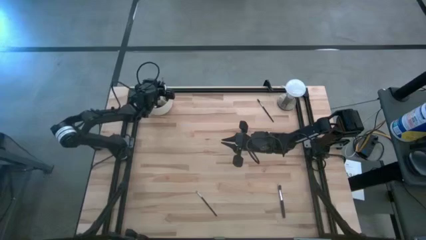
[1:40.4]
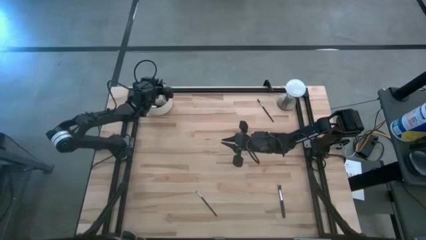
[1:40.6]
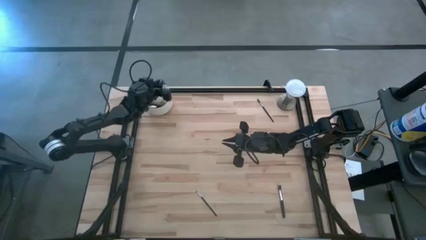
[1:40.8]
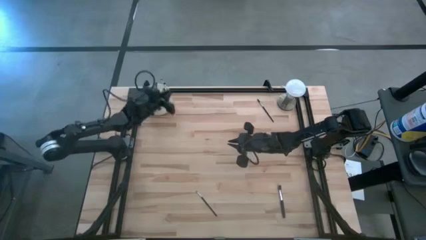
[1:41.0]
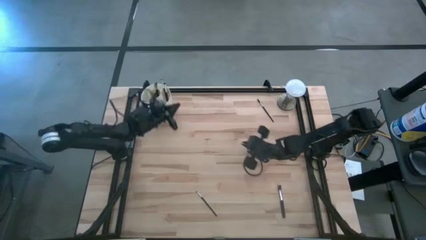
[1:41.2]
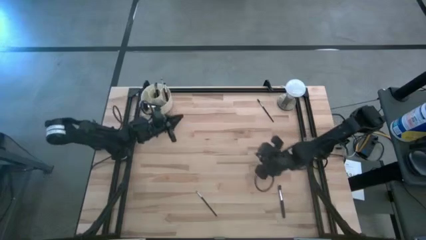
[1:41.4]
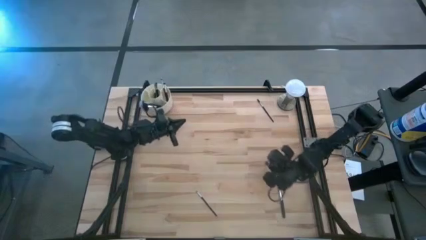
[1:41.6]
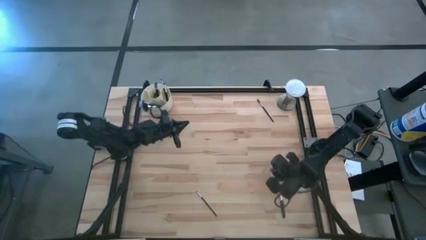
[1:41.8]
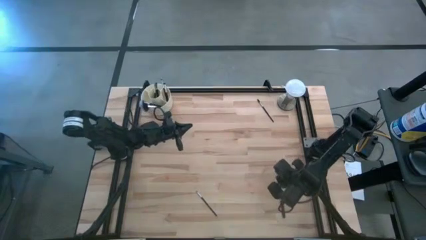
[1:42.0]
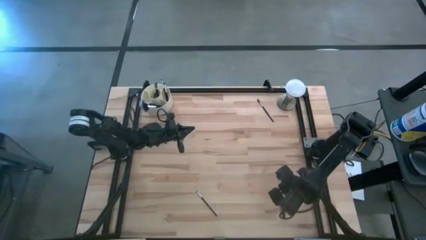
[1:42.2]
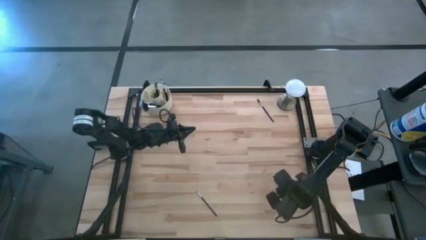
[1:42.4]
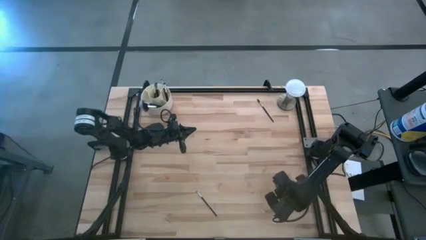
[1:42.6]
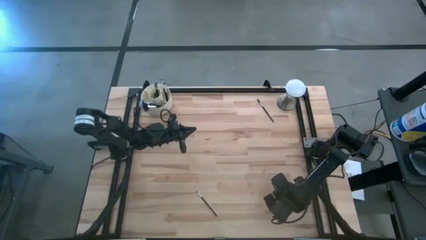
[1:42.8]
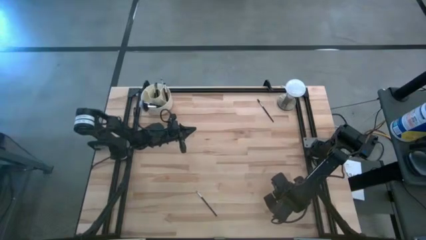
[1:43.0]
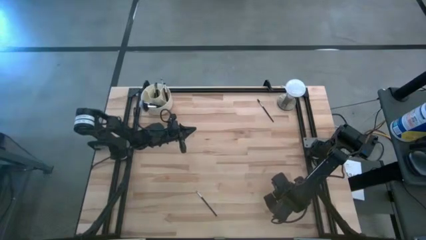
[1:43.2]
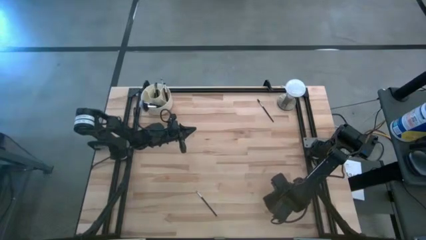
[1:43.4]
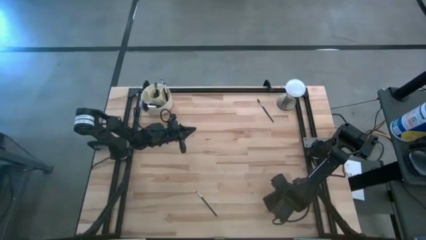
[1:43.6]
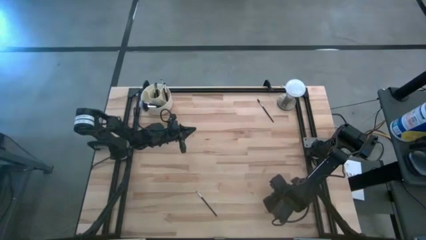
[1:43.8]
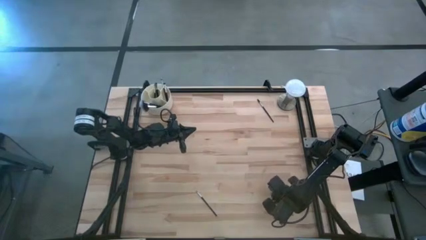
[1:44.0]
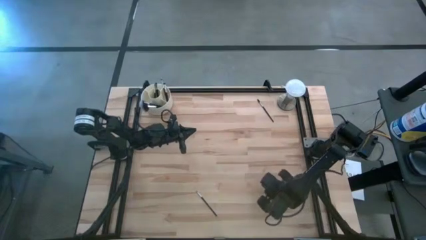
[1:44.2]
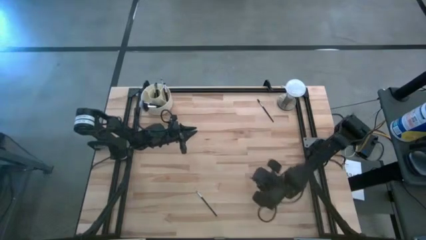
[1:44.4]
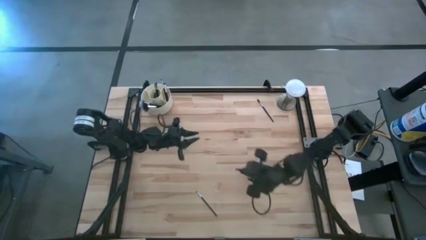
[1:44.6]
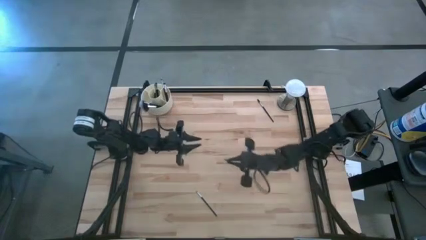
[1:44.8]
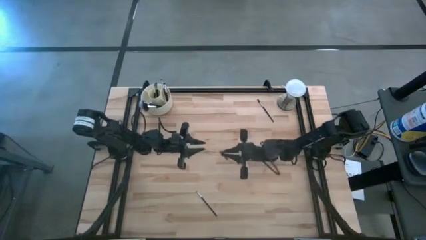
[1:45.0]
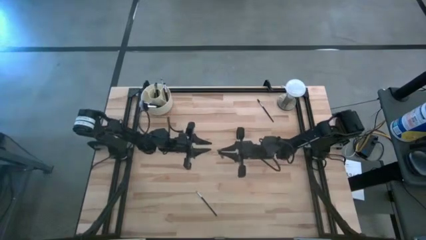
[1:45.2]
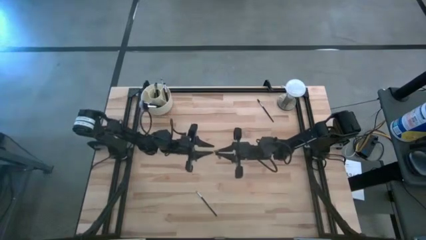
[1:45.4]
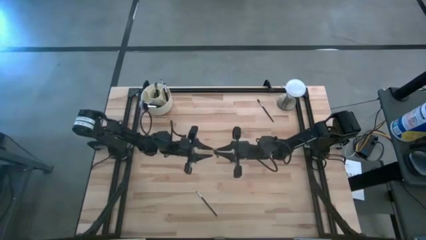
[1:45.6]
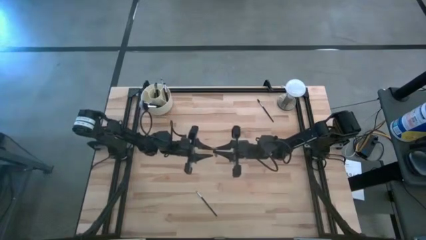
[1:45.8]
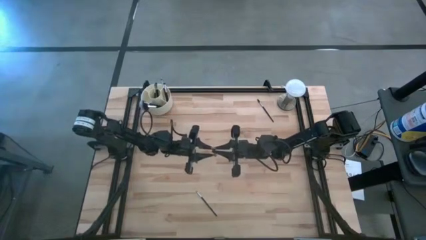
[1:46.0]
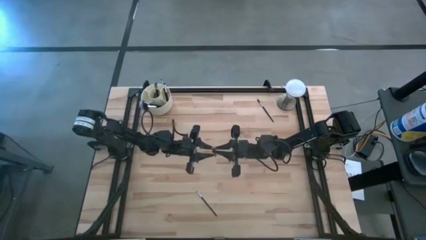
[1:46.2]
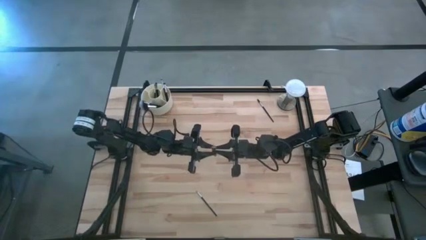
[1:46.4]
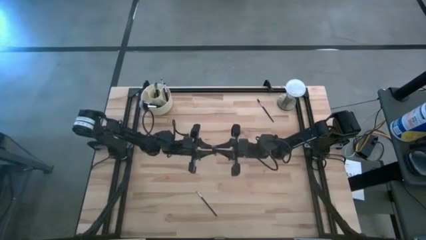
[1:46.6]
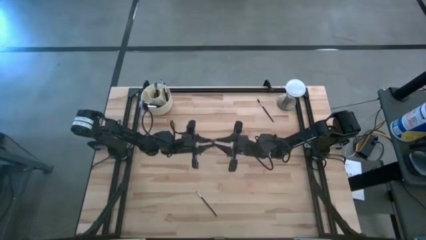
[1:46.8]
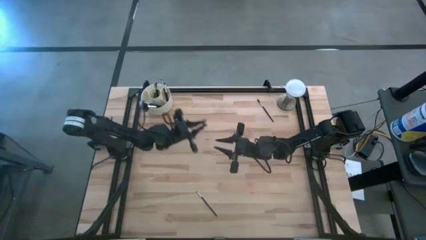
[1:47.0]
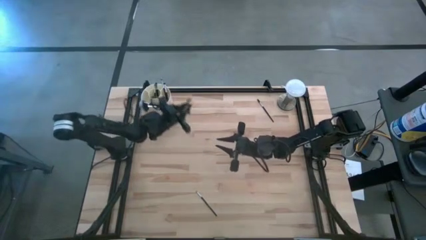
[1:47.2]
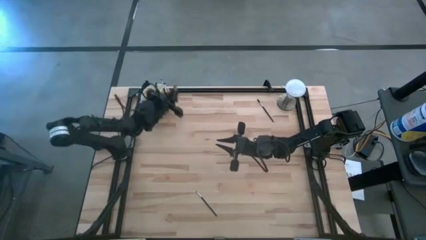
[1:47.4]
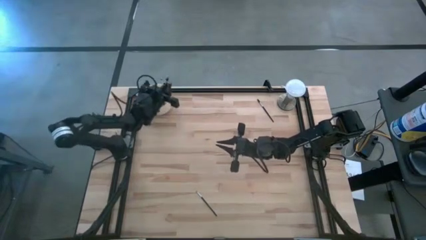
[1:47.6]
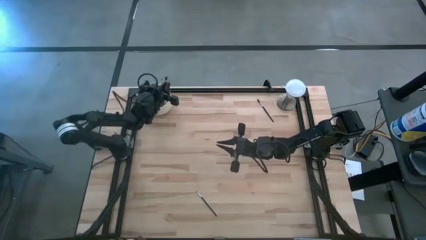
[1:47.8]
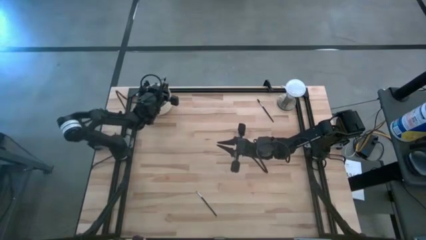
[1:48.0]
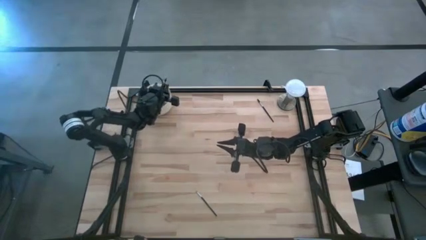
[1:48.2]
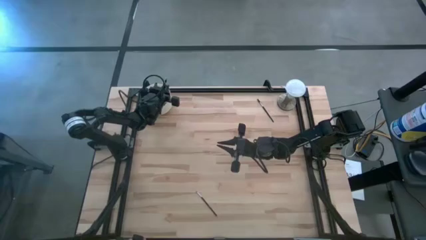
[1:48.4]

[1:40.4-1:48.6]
Task: Put items in baskets/containers
Put the foundation brush into the organizer

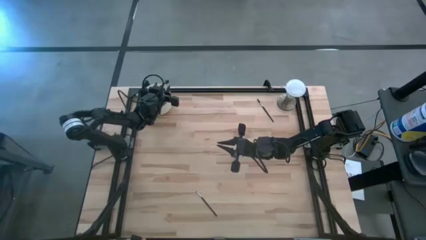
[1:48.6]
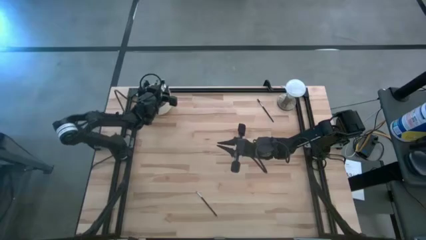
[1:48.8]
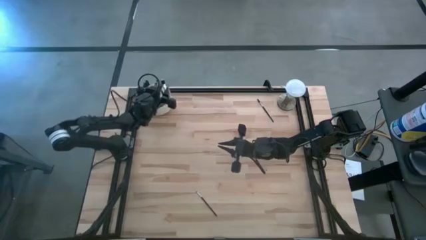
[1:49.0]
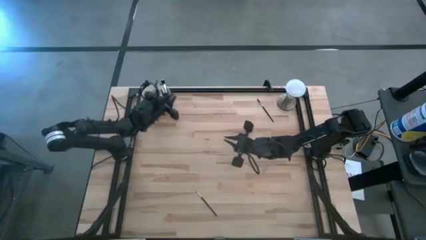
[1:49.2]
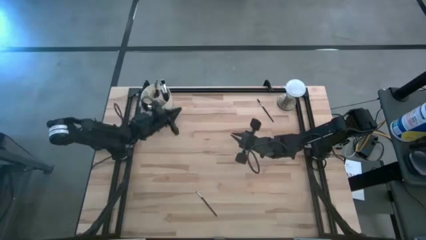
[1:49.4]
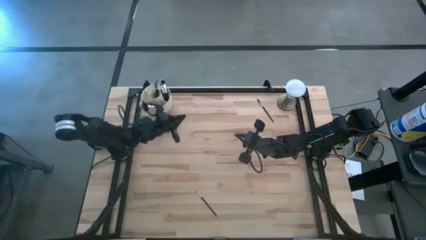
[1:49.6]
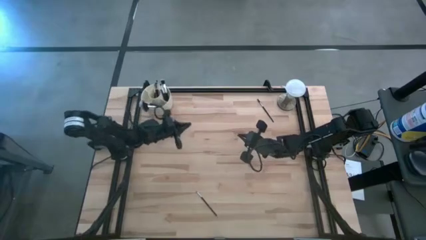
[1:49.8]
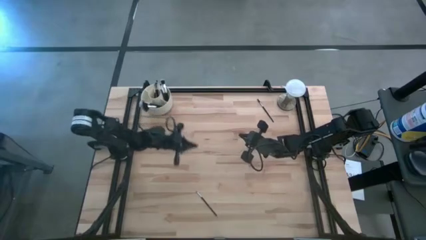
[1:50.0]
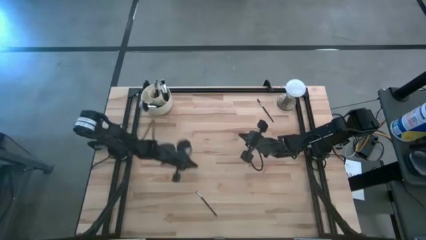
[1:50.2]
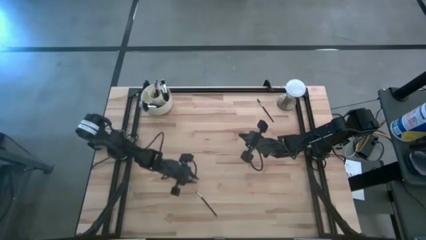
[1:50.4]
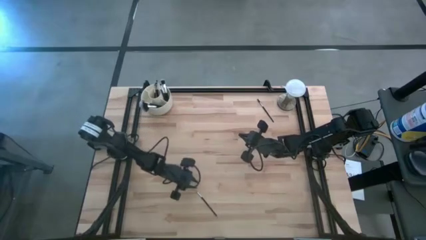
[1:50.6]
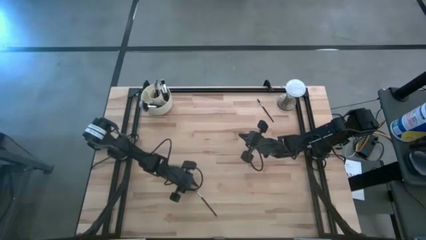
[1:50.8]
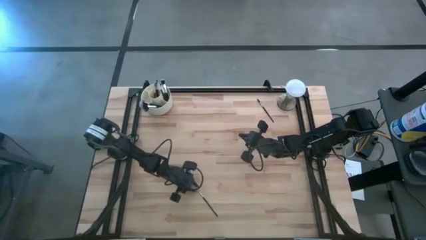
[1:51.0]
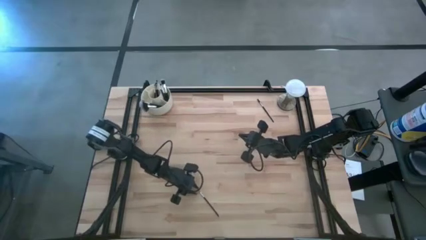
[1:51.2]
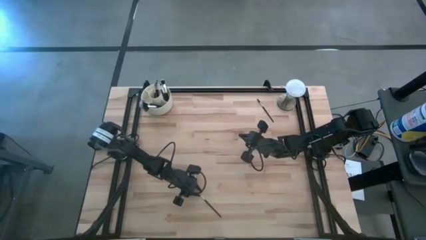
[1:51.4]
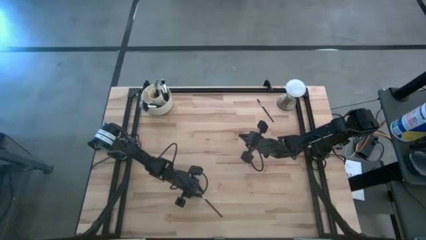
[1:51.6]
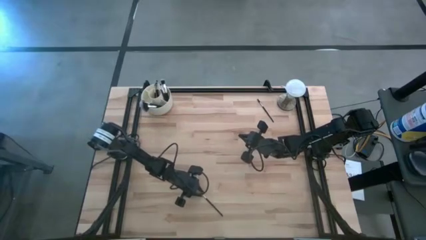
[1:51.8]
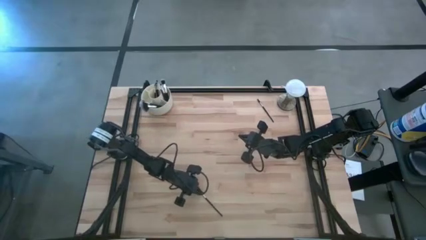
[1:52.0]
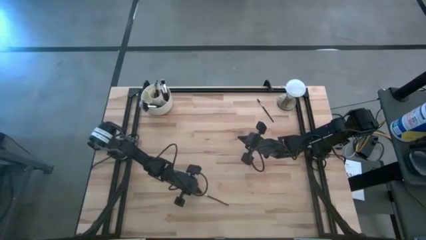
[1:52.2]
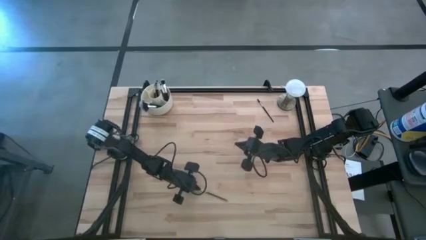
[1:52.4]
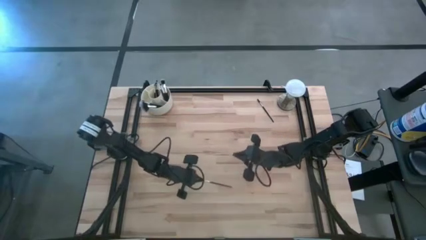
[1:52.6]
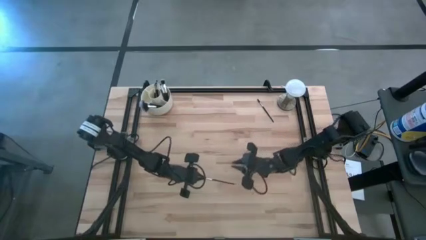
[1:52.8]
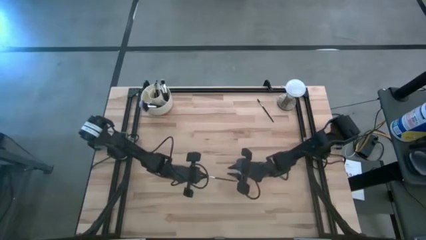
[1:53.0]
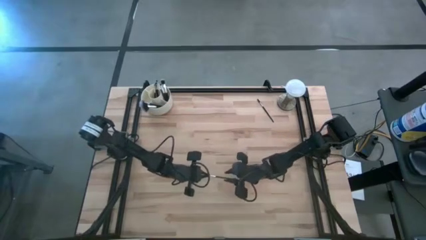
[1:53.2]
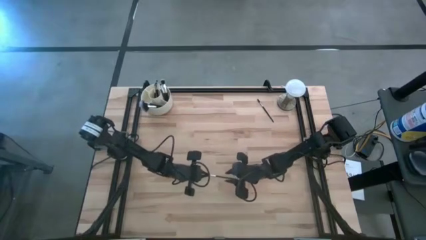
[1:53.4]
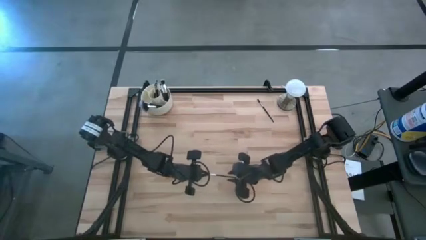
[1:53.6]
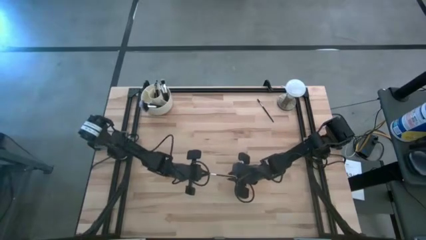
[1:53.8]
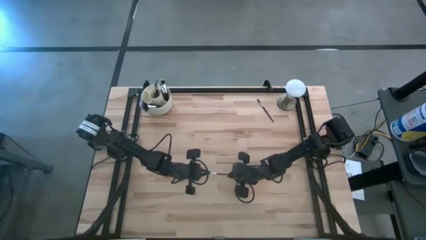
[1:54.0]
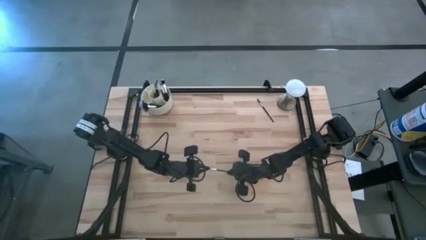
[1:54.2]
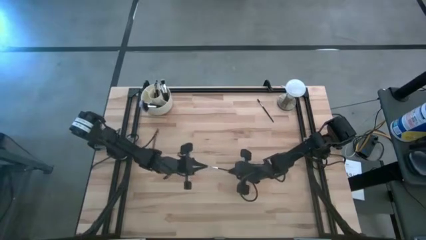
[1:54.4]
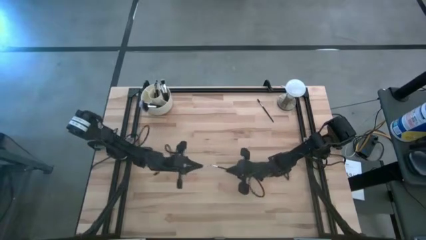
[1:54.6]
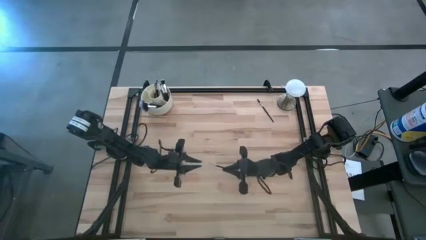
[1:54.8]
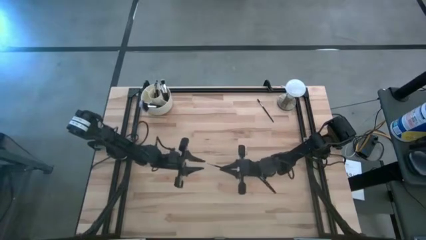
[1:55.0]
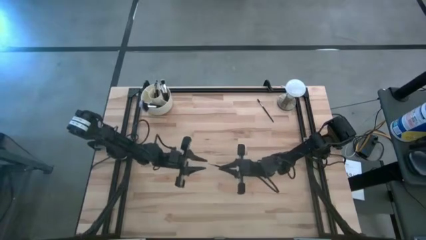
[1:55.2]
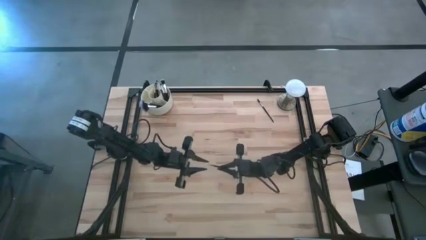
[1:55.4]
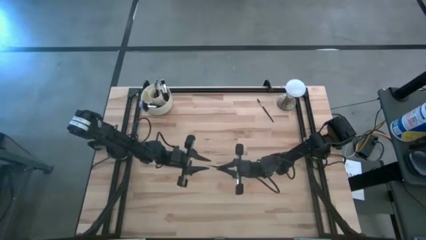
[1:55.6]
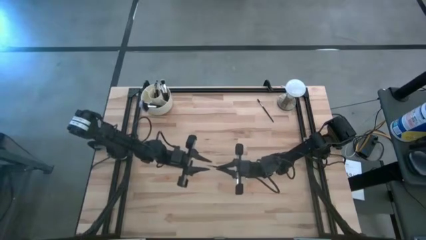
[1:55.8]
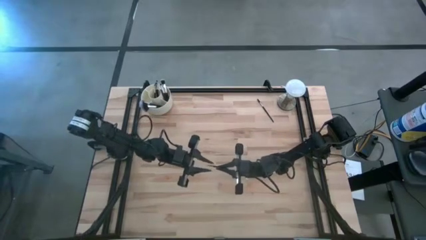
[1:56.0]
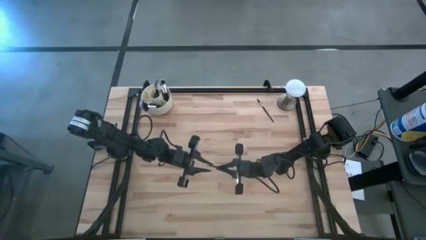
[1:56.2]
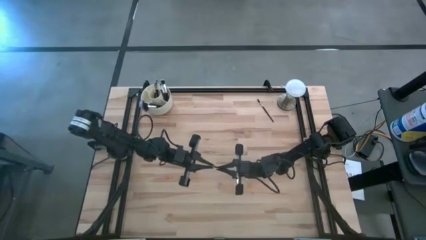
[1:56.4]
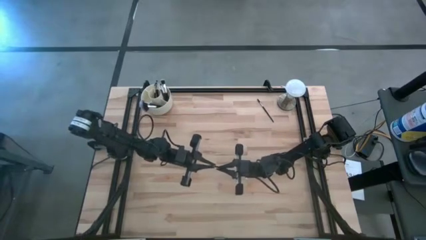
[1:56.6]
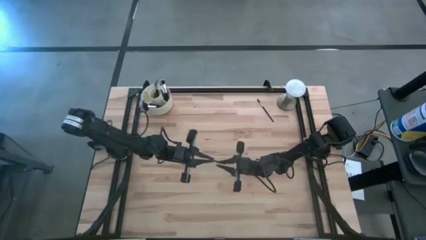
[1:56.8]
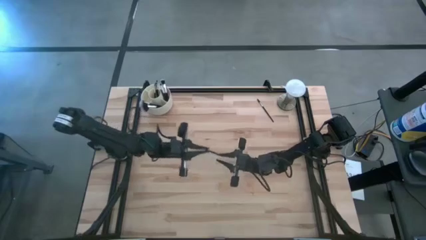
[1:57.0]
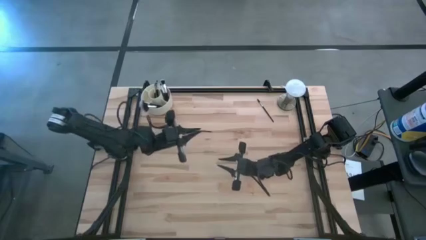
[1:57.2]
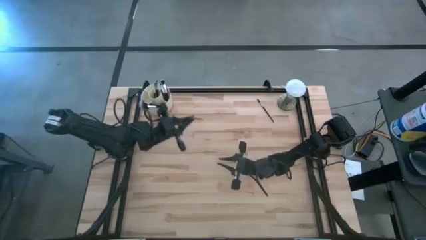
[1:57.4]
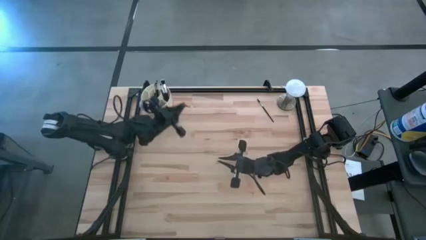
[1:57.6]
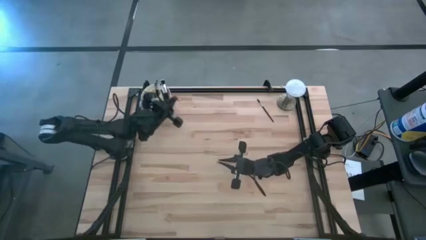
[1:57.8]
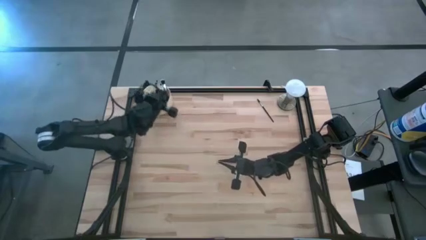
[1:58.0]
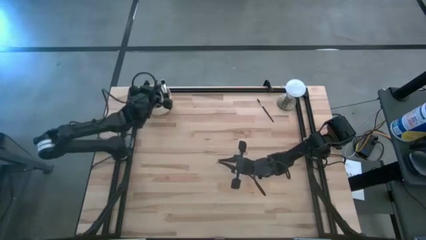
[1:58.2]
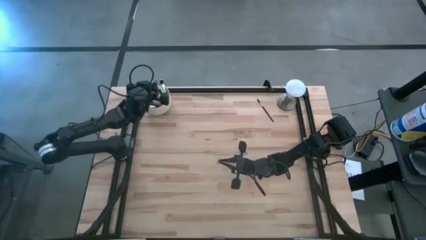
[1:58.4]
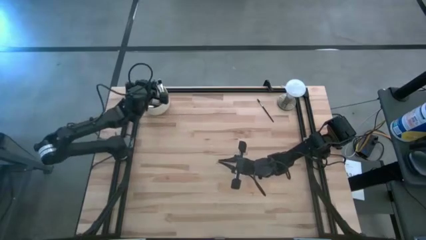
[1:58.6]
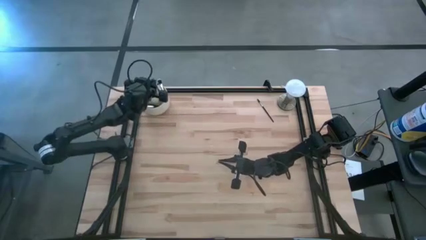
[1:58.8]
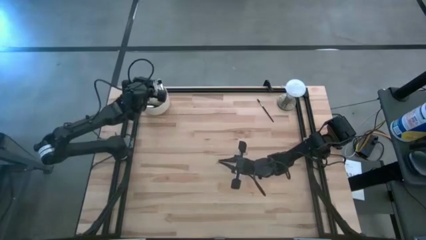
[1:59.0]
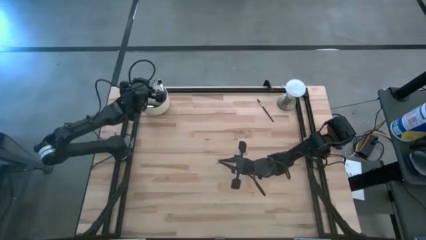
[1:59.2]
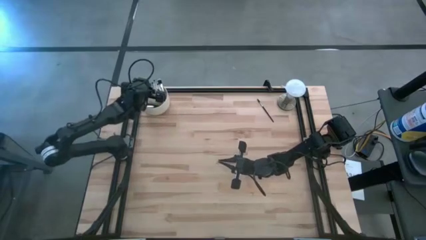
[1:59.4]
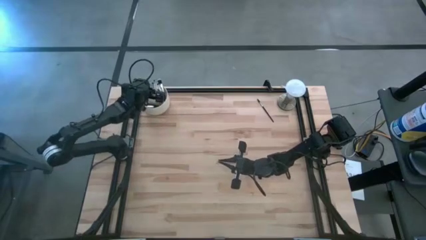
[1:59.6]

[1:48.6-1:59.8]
Put the eyeshadow brush into the organizer
